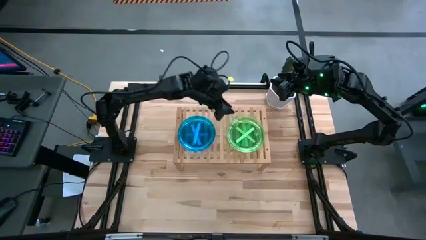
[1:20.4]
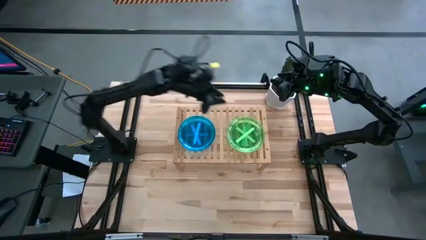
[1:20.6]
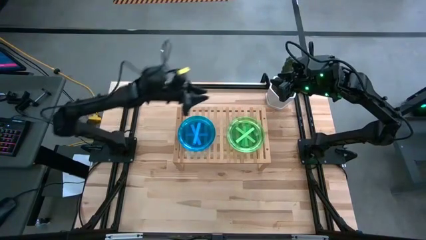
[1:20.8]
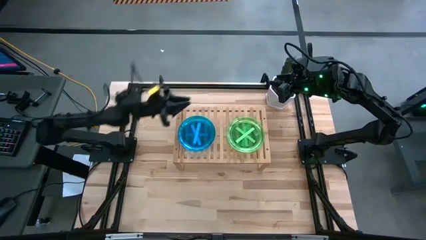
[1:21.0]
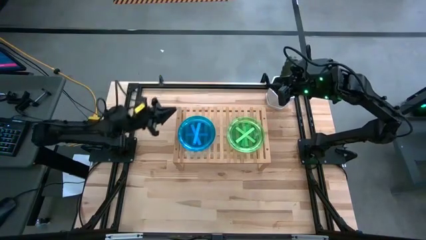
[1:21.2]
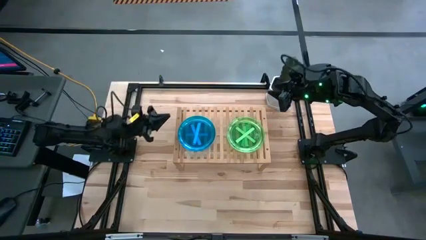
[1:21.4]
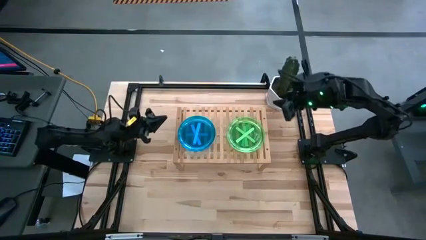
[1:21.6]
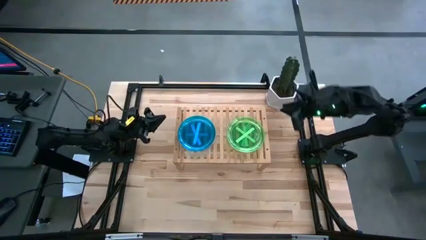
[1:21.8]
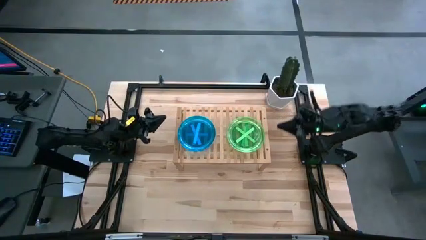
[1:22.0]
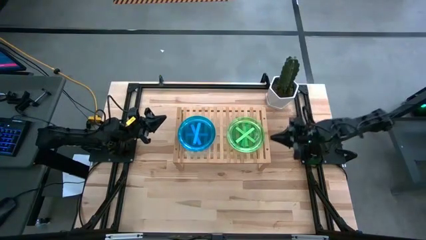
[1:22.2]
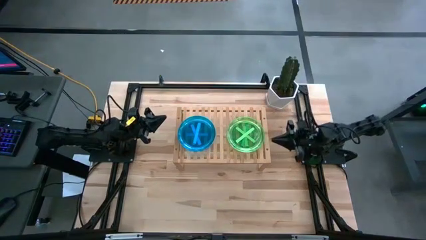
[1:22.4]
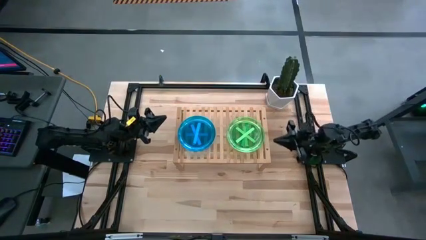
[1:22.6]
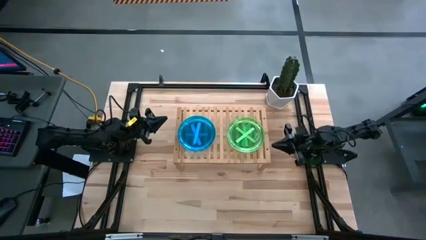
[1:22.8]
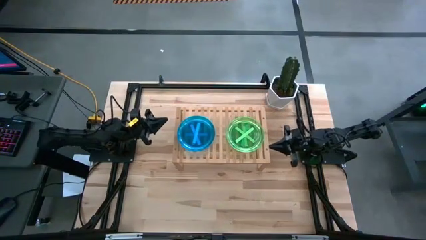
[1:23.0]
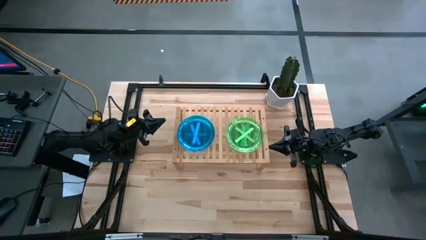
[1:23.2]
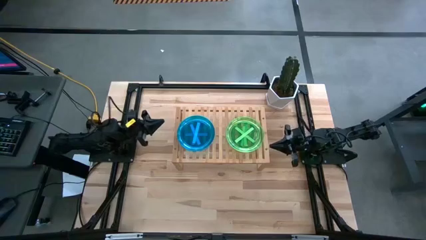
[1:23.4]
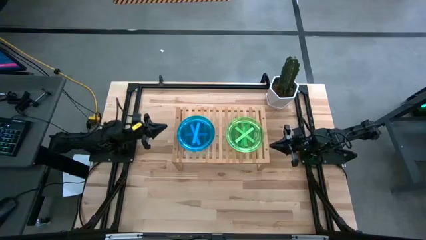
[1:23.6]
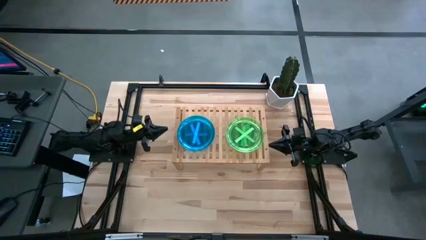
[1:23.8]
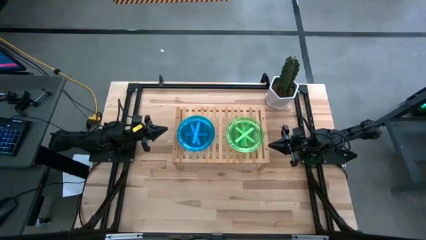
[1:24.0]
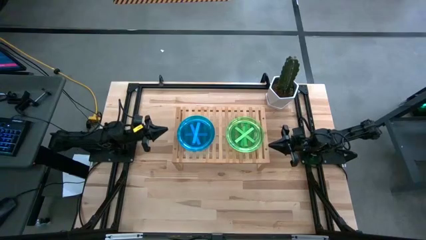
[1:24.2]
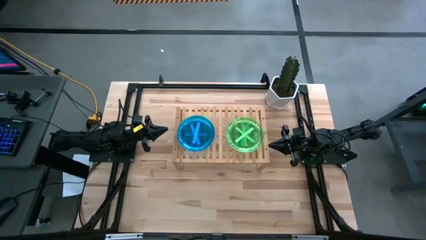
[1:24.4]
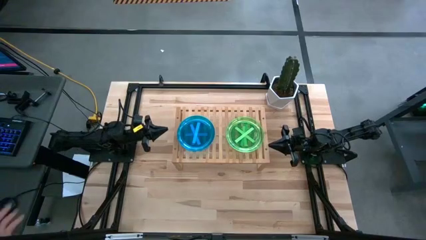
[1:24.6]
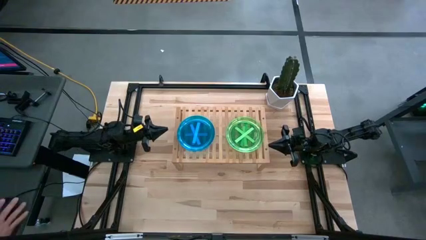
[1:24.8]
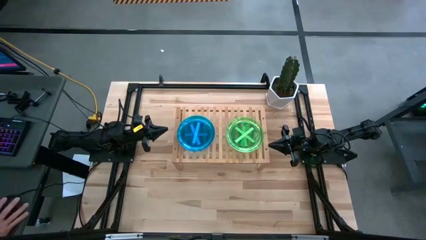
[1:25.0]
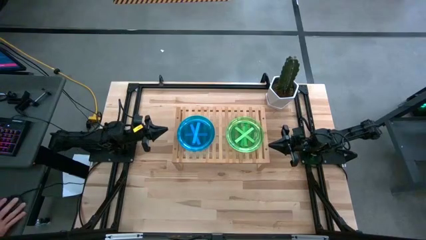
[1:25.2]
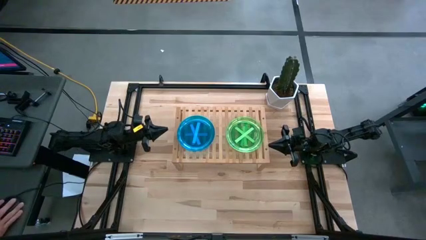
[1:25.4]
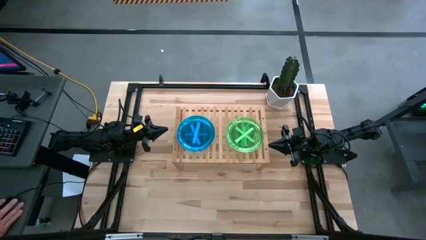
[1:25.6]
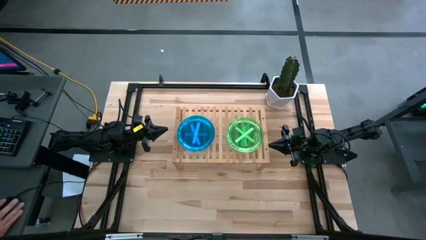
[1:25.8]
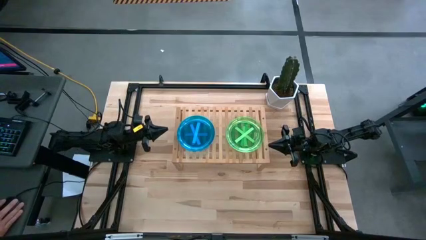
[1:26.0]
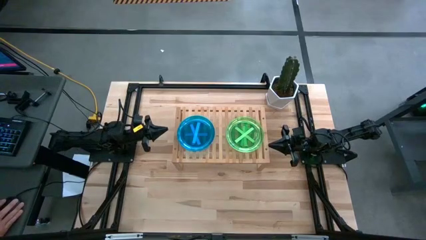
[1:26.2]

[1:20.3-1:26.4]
Task: Place and stack plates onto a shelf
Return to Home Position

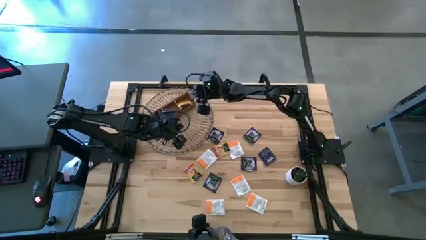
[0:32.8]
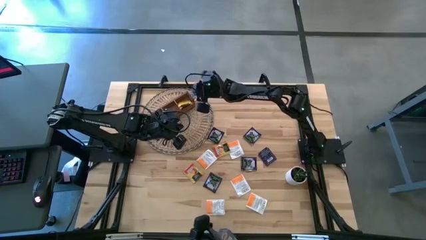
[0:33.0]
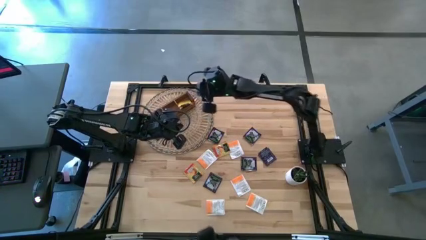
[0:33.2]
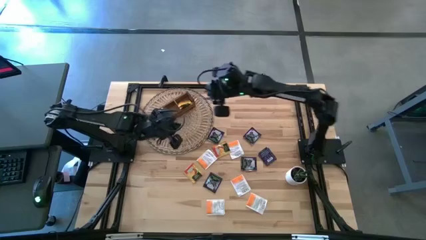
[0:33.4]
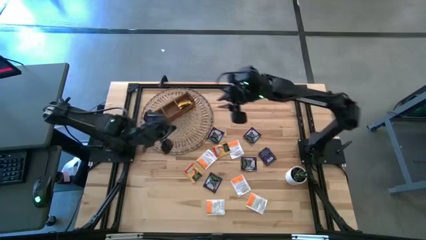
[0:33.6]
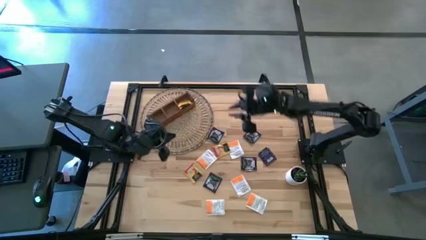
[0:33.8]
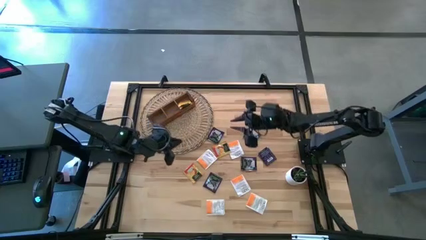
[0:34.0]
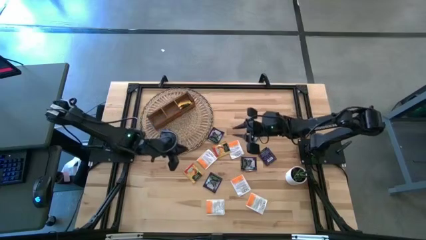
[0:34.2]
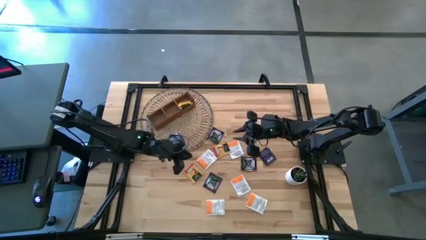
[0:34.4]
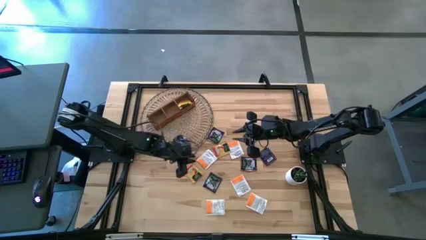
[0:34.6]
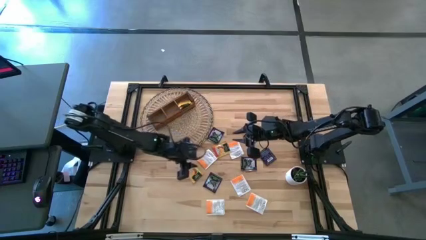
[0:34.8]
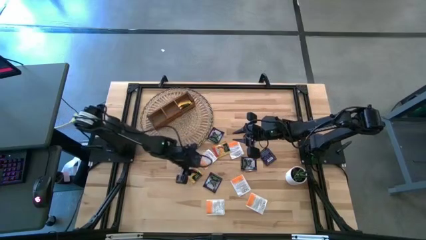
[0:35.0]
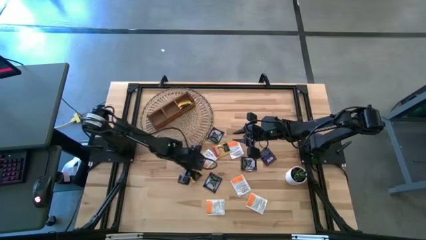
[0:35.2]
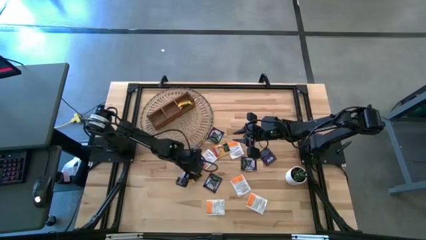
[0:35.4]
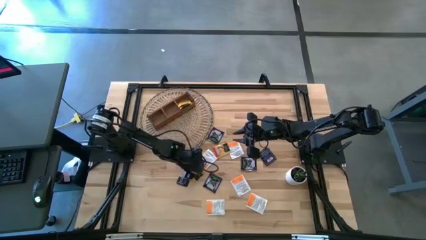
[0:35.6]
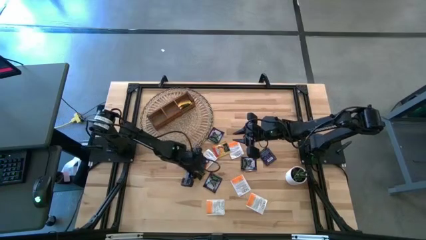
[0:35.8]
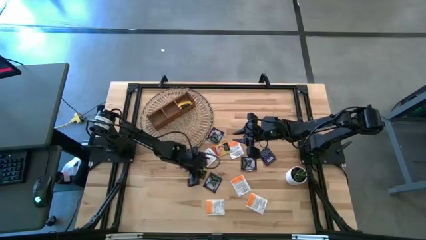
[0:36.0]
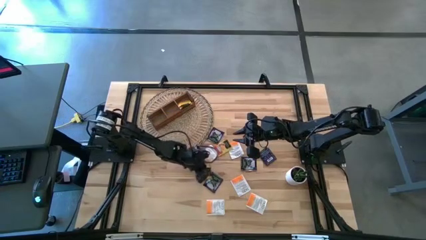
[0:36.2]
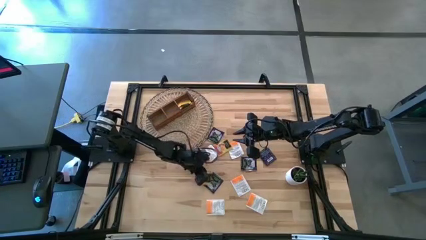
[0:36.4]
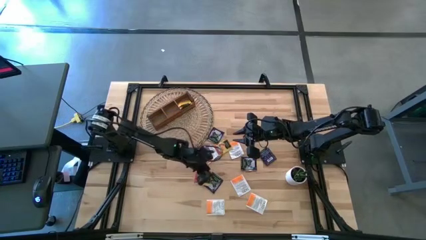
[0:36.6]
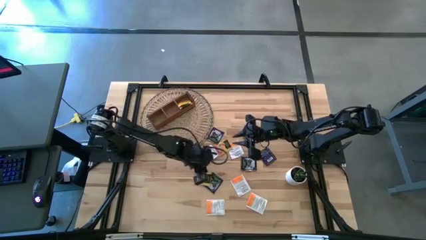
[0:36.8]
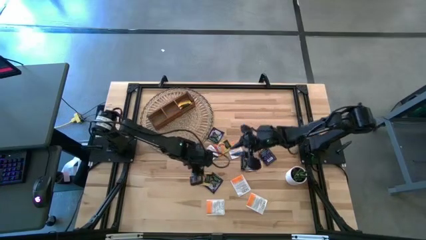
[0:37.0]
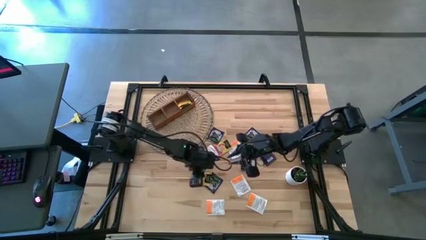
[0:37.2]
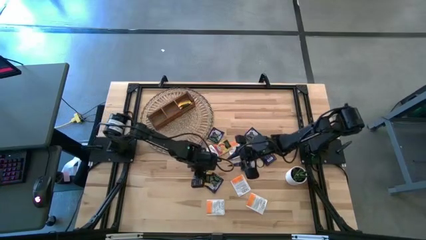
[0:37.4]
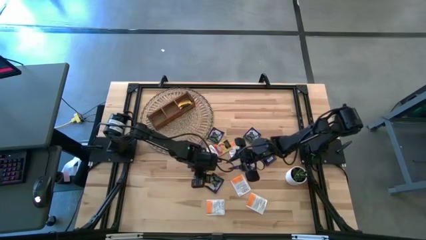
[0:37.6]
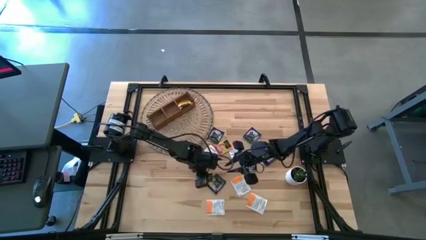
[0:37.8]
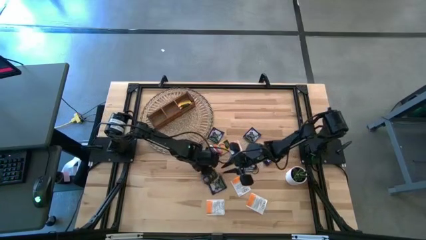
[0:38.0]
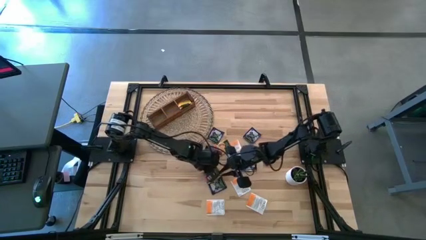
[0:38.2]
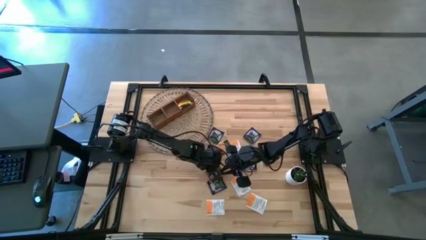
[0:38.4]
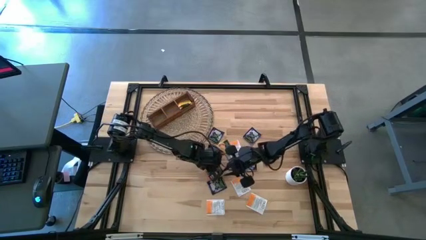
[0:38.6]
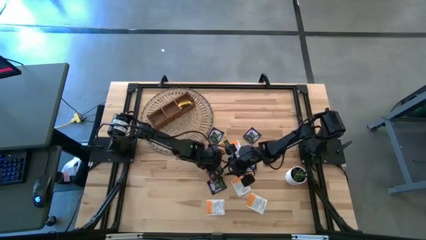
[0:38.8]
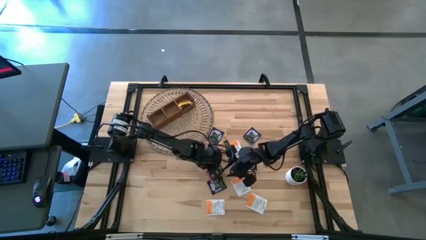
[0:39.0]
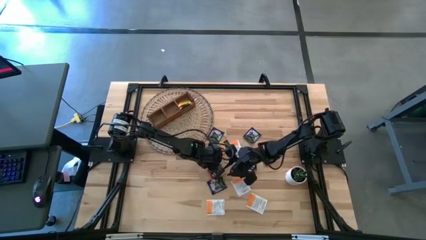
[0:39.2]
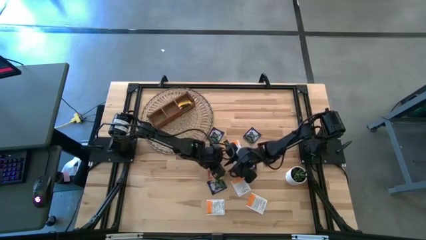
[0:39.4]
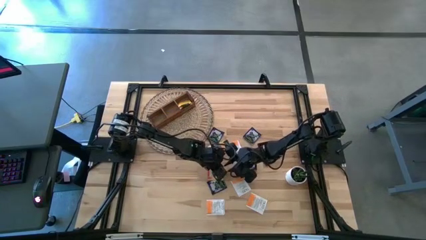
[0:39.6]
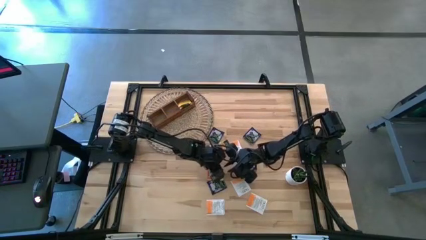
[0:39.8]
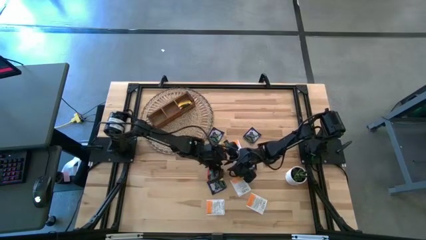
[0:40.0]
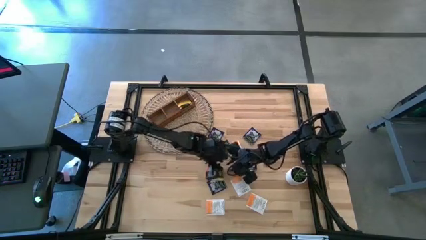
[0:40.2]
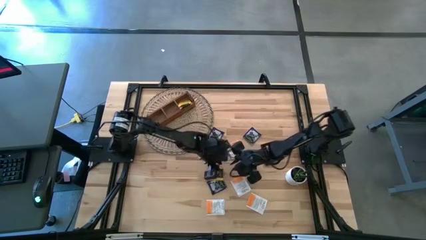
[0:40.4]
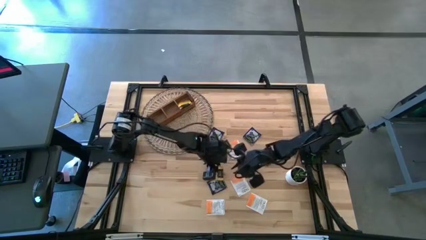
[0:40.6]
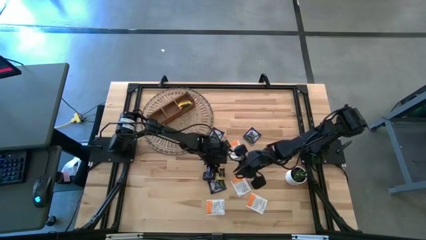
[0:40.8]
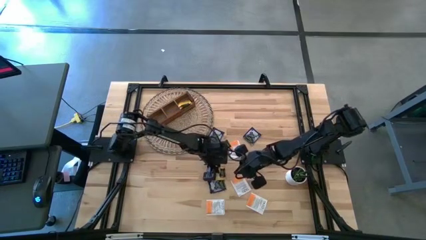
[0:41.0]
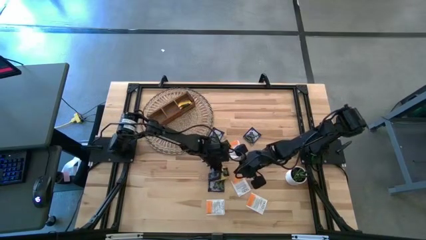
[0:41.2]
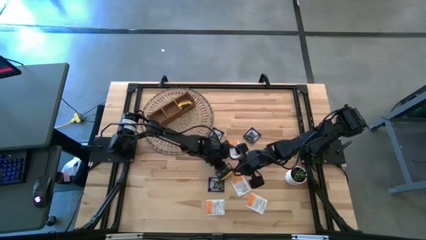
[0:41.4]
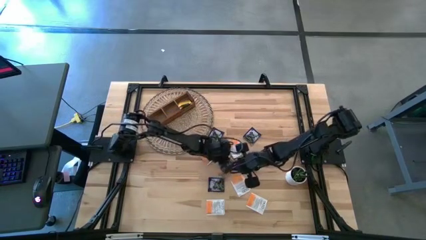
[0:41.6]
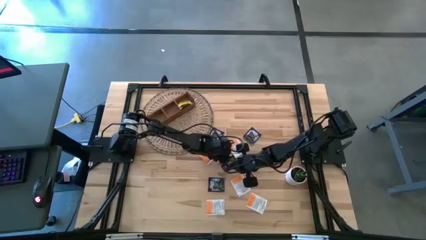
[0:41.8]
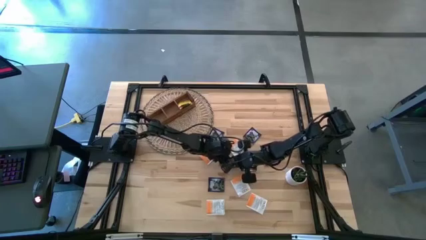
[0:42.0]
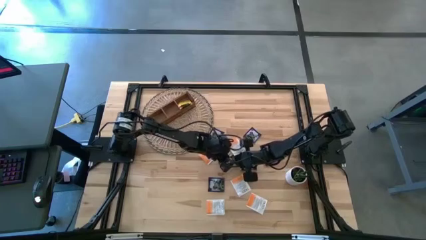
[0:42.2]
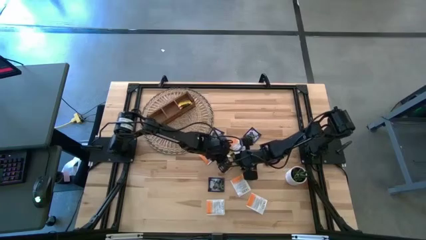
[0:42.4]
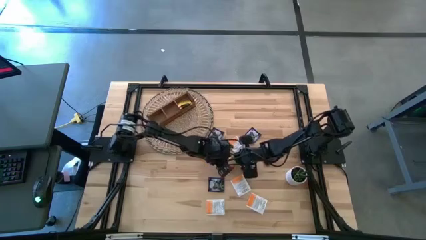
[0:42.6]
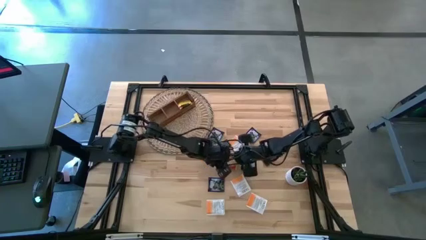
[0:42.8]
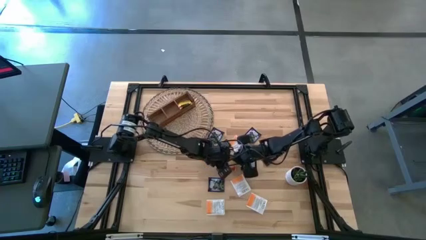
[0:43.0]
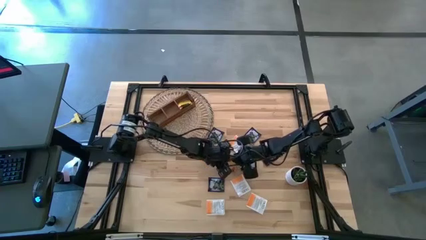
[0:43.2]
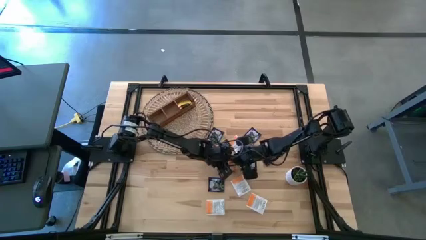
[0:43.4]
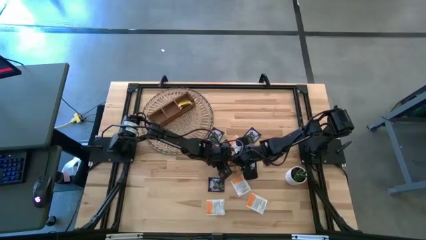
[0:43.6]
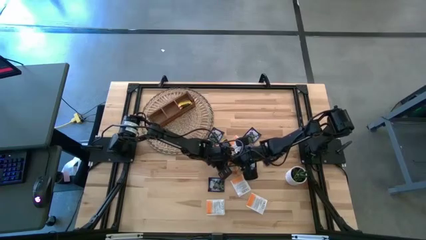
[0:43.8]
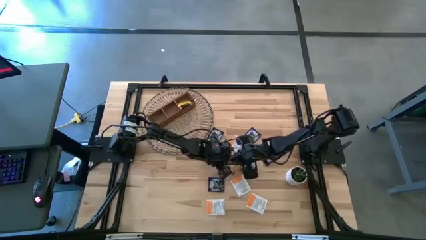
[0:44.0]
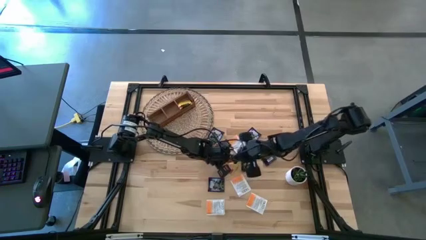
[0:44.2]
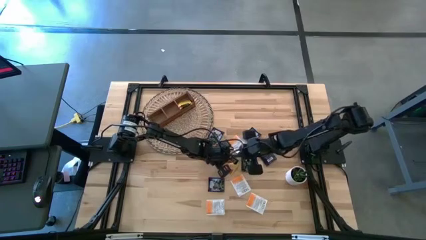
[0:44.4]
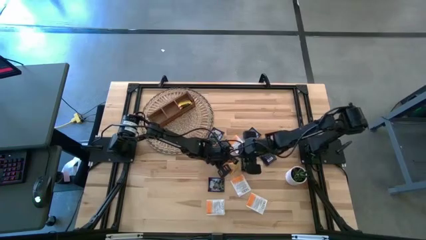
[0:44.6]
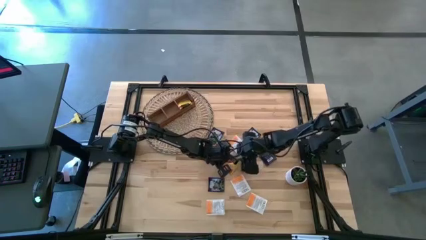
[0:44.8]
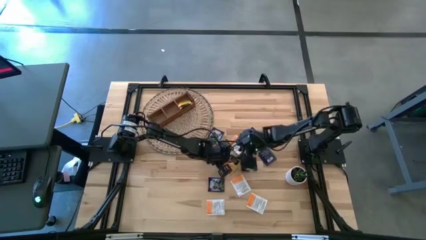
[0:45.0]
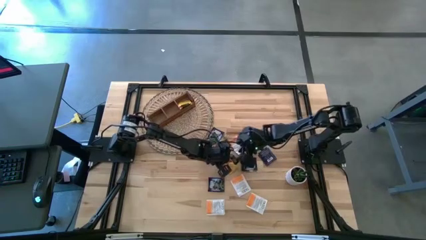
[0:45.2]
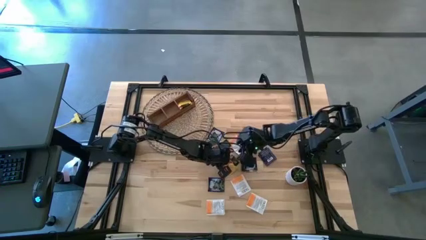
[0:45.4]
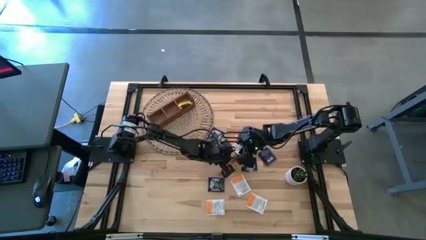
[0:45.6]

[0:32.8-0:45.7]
Task: Pick & Place Tea
Put the yellow tea bag into the right section of the wooden organizer
